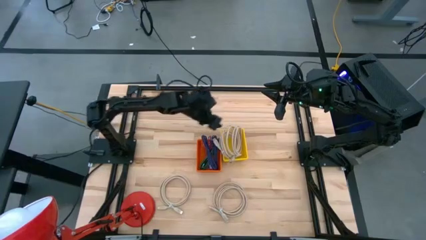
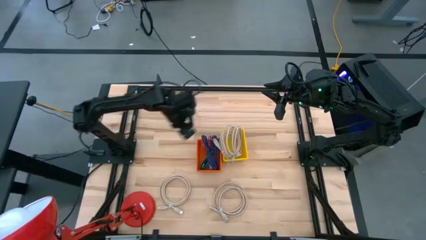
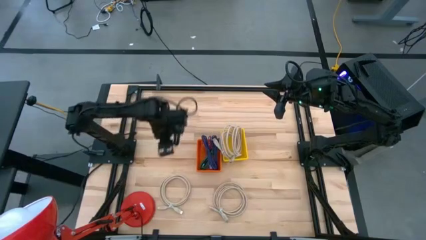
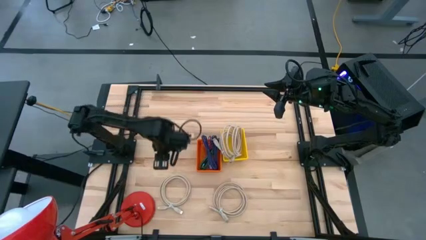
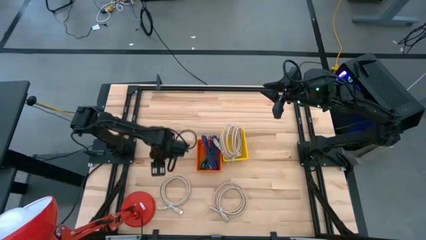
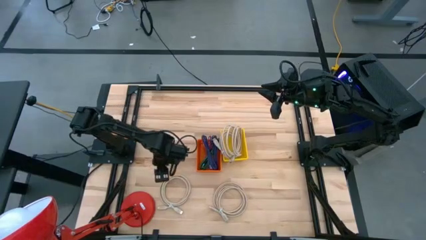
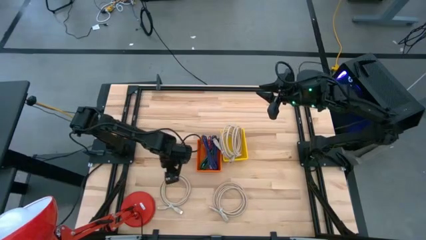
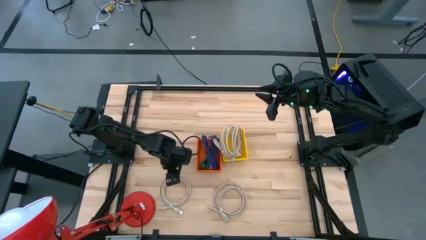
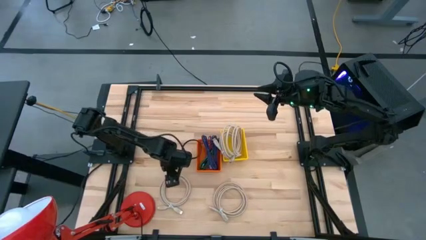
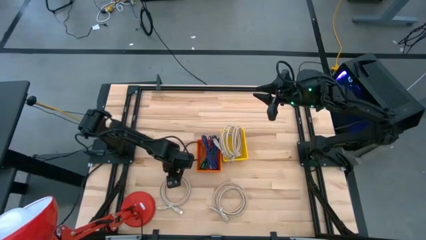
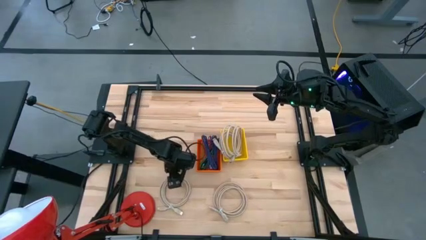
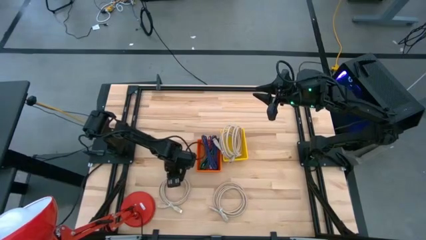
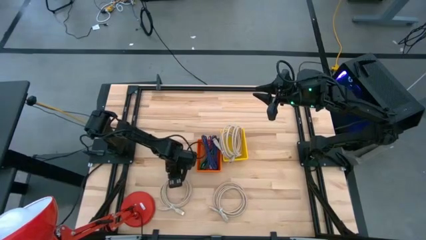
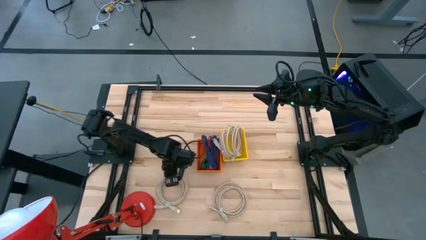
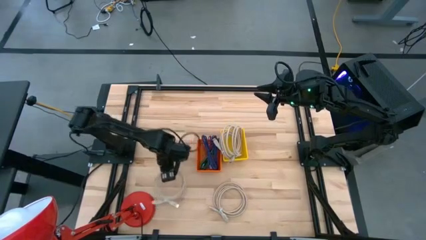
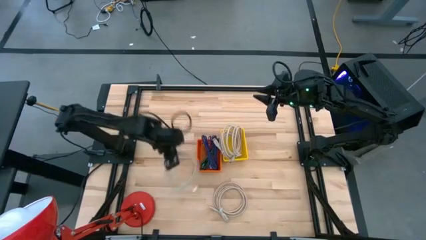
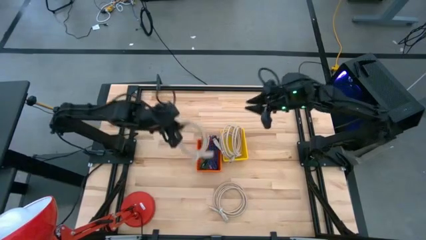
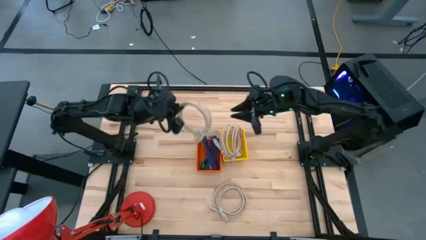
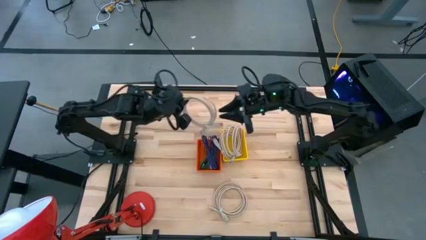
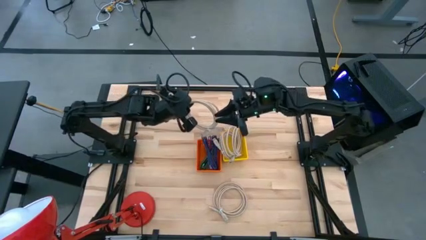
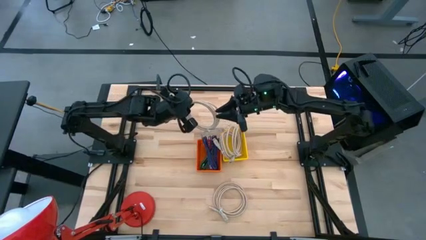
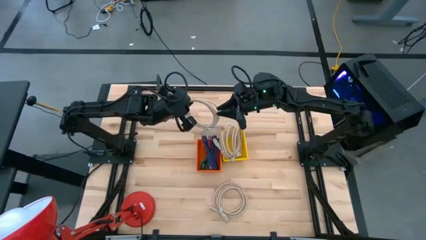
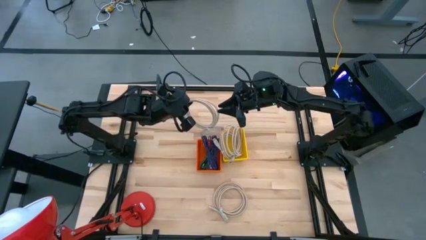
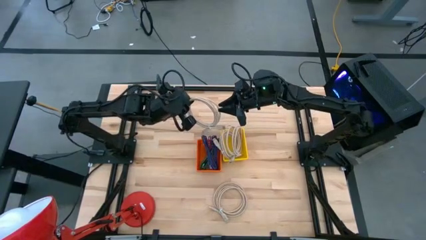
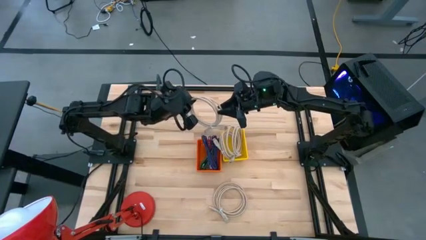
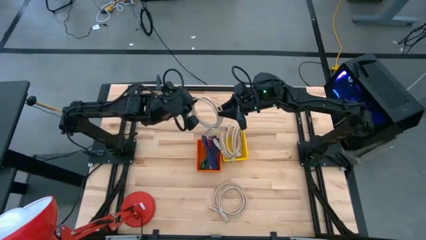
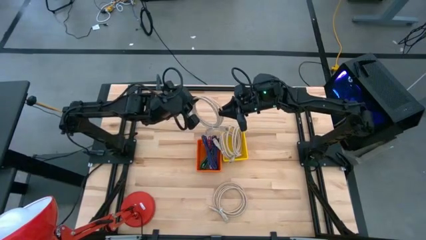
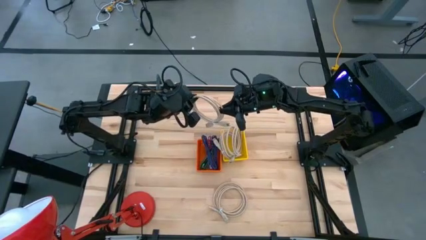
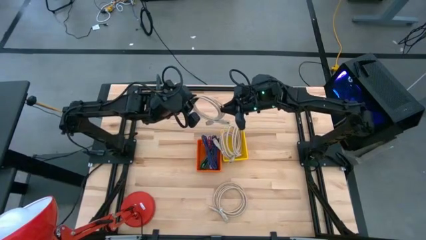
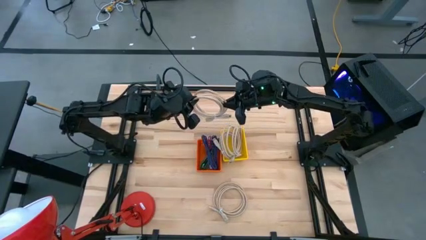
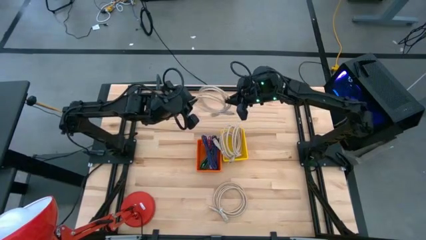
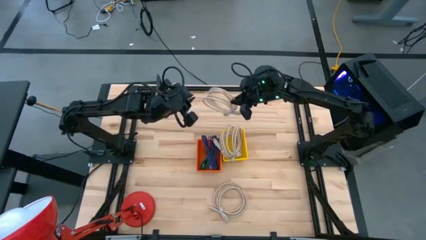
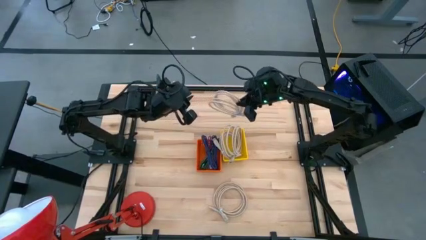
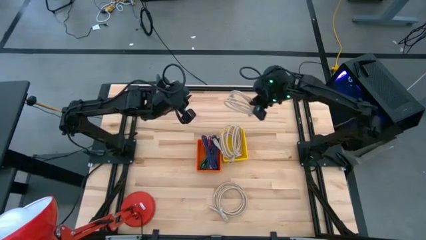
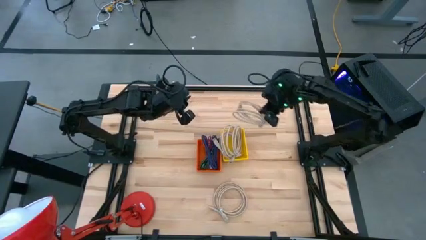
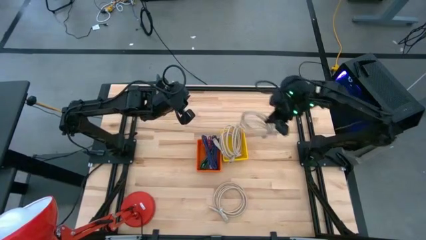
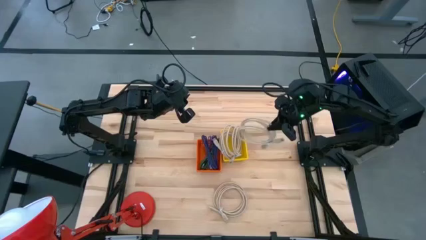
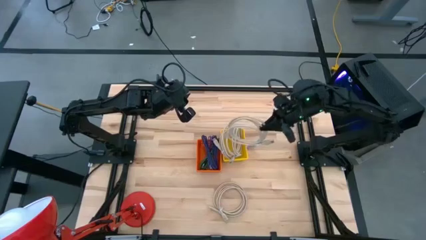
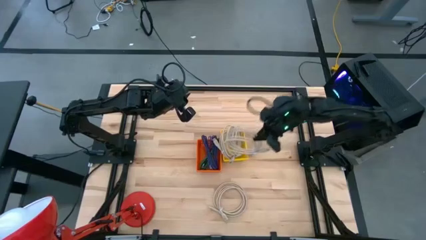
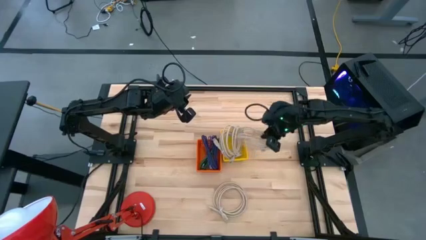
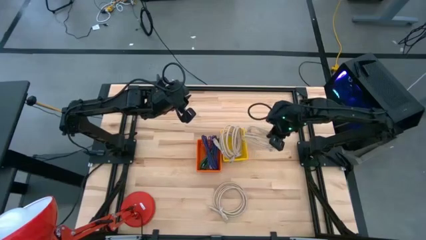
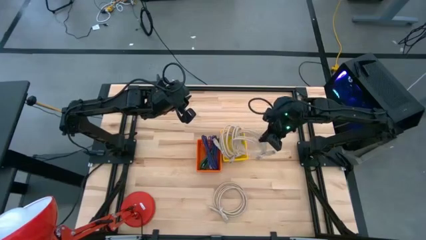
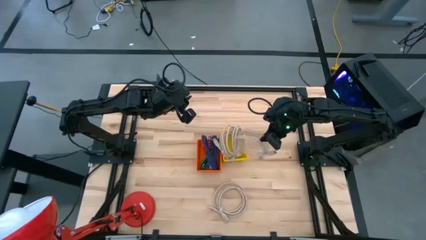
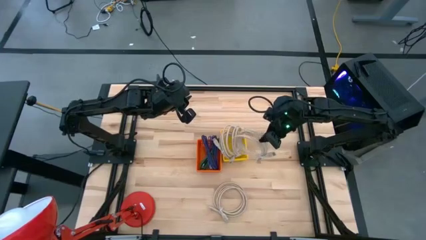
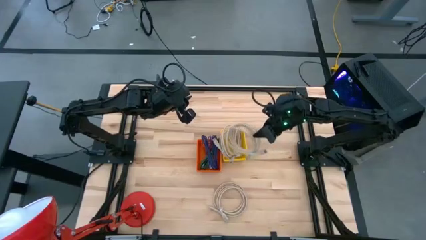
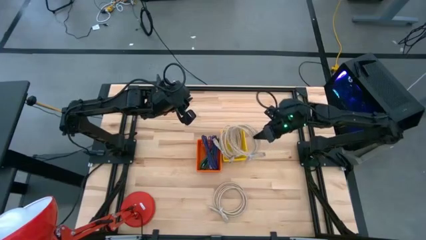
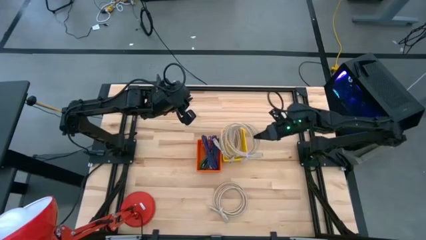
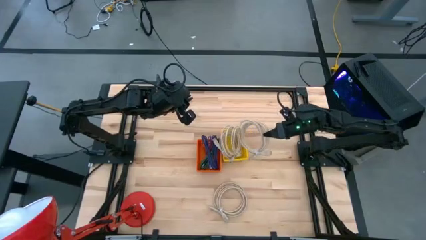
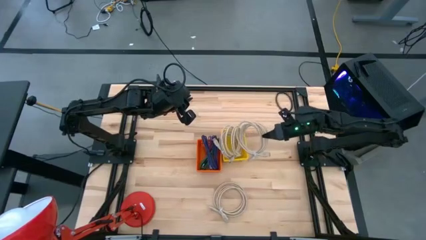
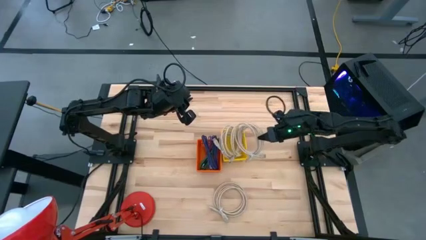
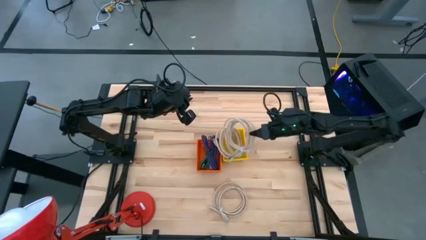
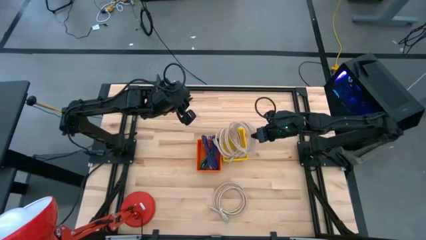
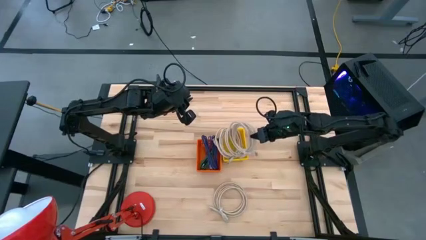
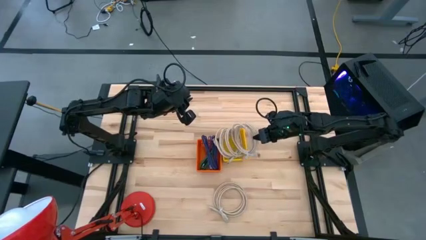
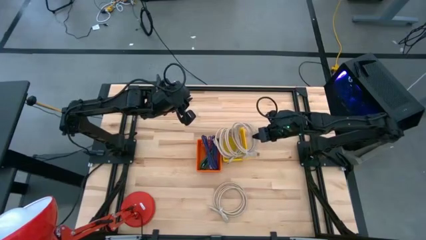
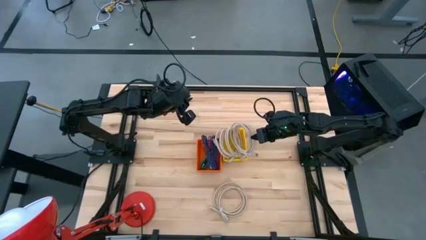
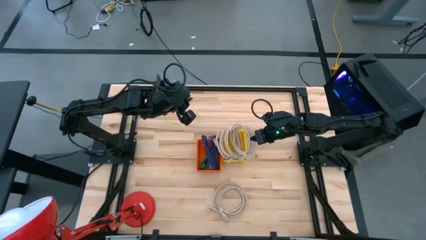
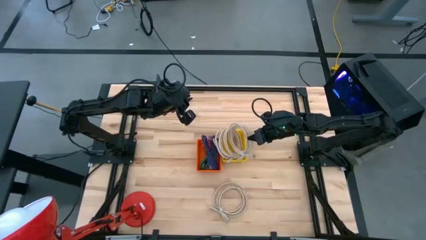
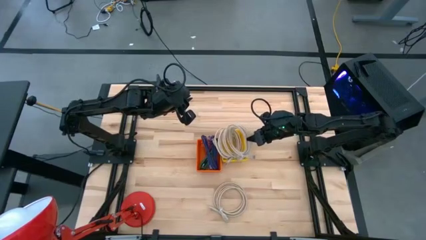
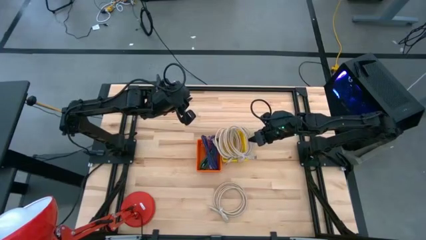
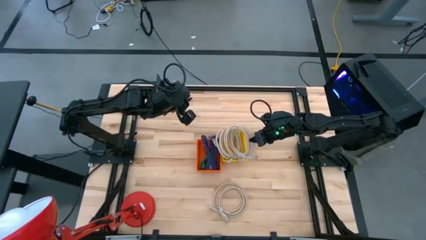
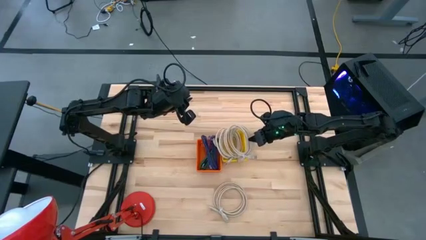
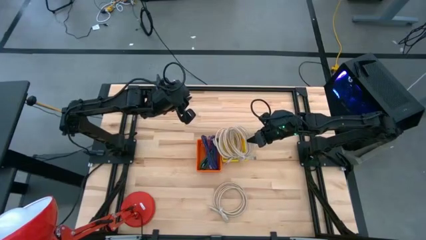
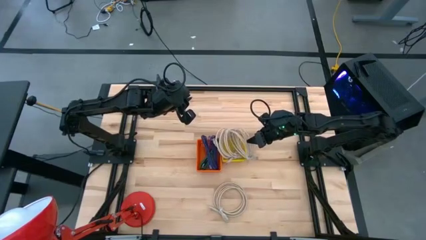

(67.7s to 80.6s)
Task: Pick & Place USB Port
Put the brown HDMI cable into the yellow basket

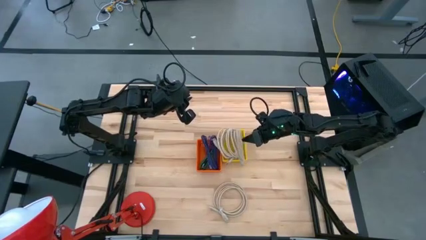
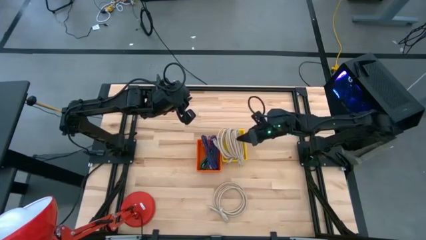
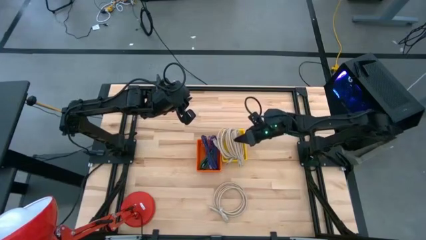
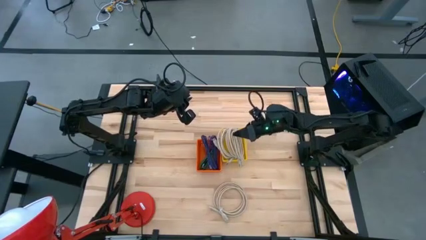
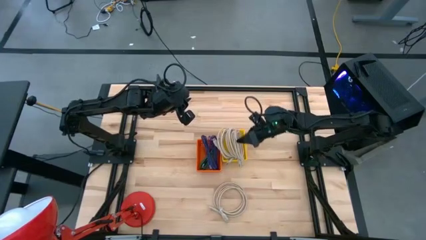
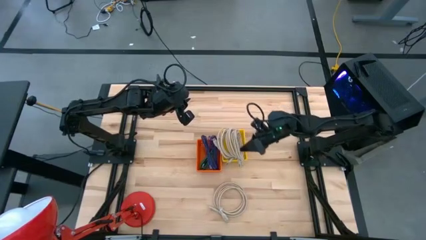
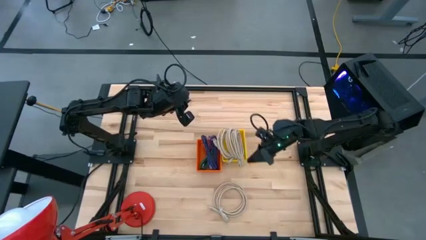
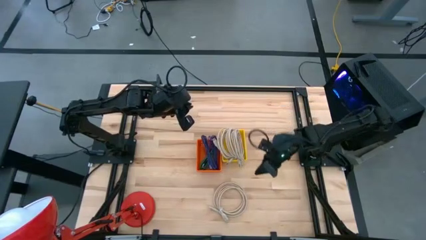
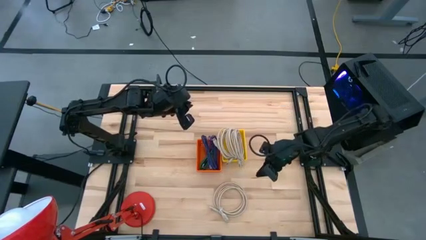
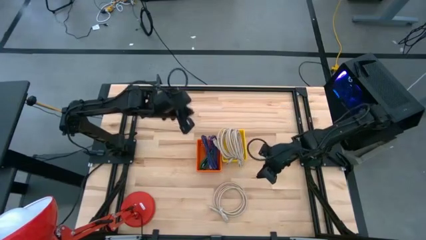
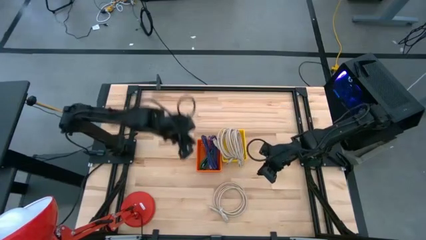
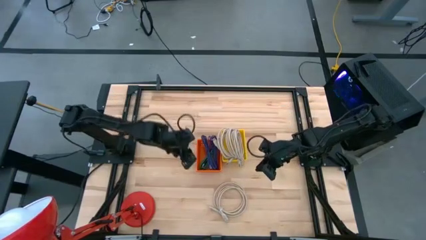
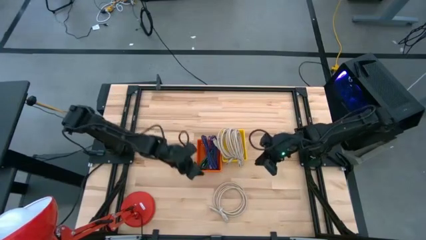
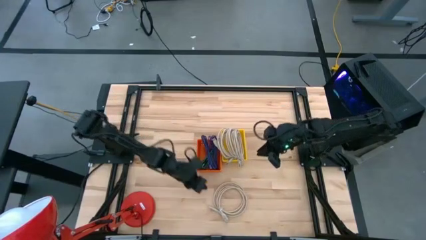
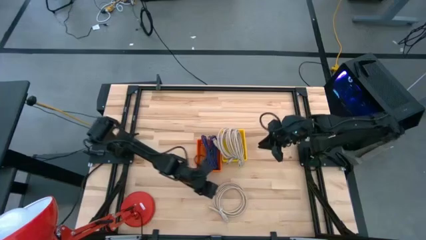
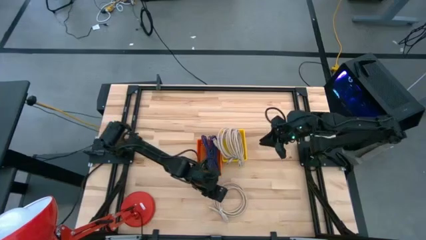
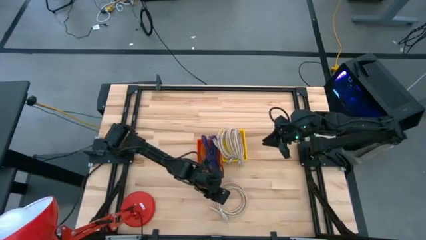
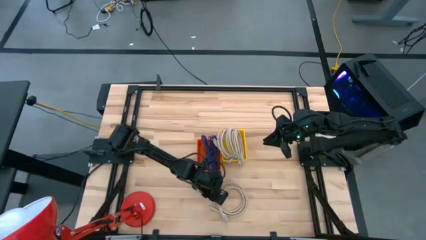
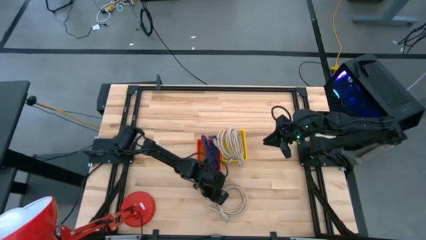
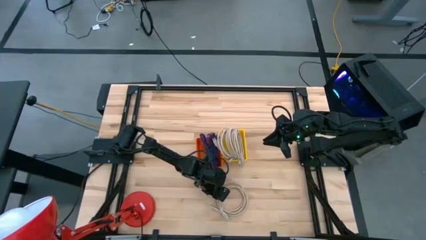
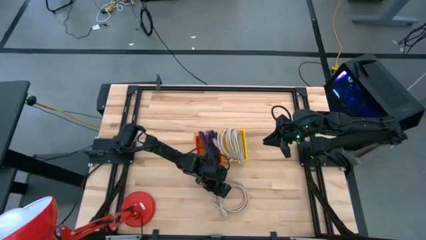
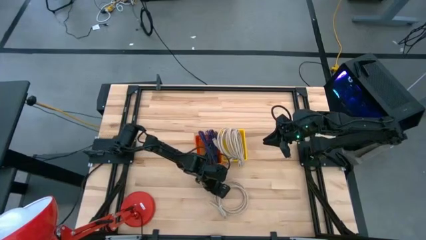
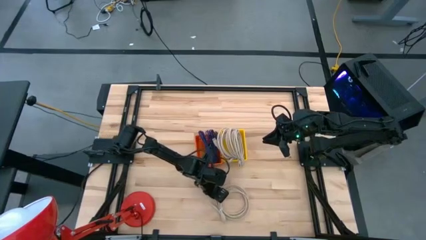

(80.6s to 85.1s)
Put the brown HDMI cable into the yellow basket
